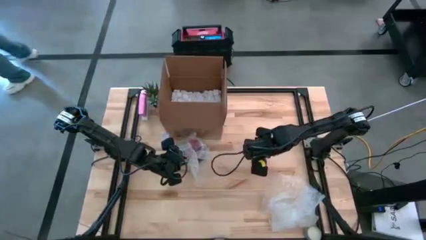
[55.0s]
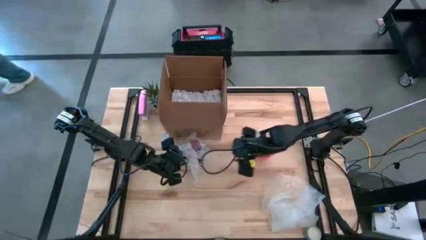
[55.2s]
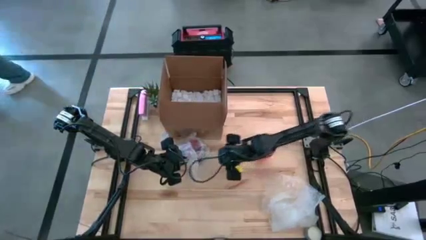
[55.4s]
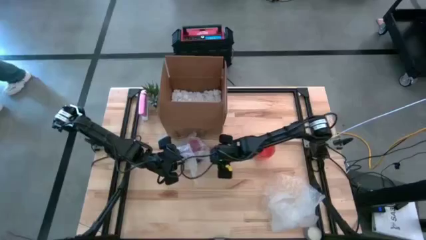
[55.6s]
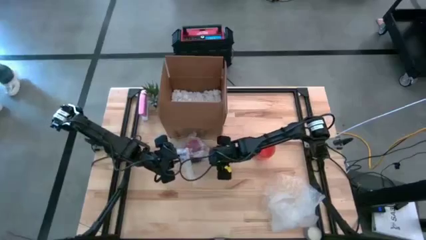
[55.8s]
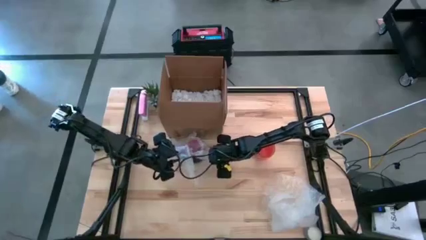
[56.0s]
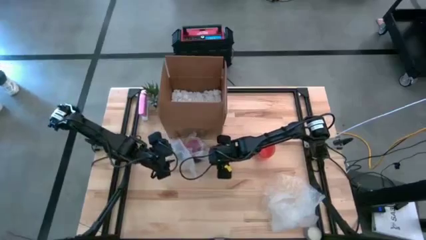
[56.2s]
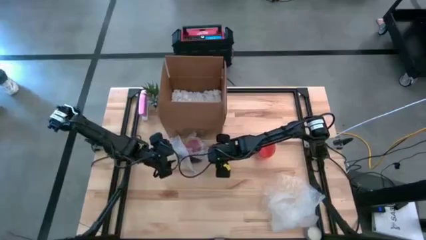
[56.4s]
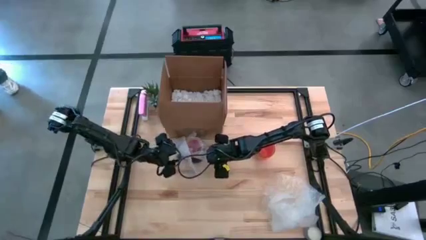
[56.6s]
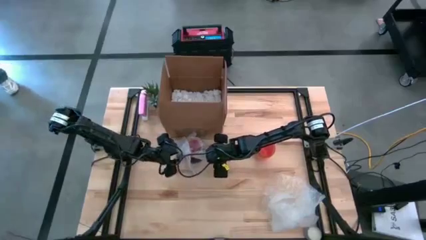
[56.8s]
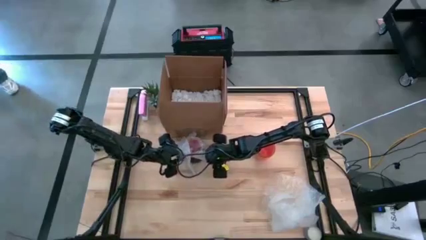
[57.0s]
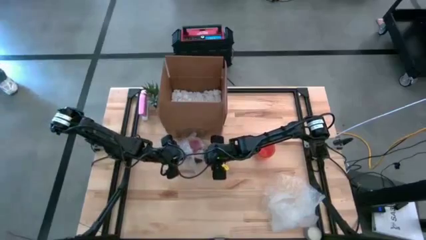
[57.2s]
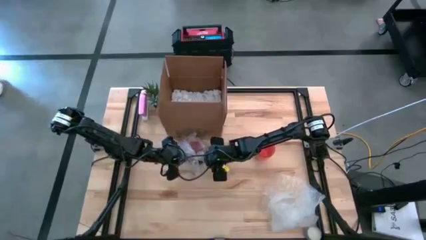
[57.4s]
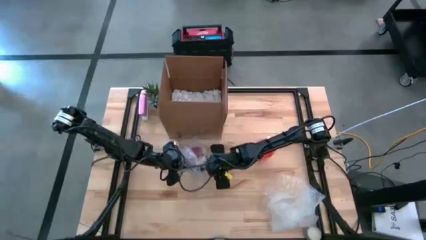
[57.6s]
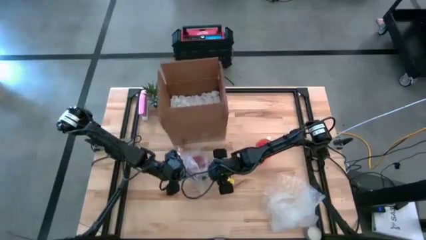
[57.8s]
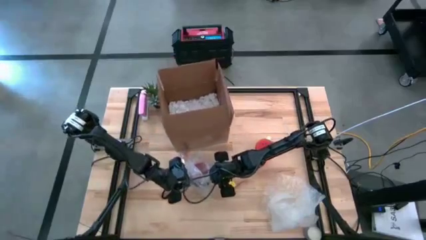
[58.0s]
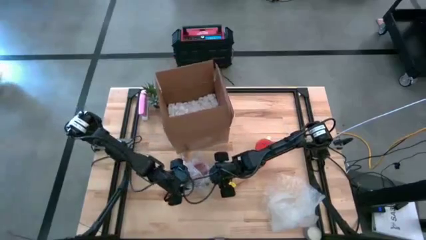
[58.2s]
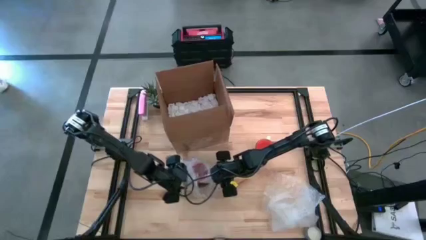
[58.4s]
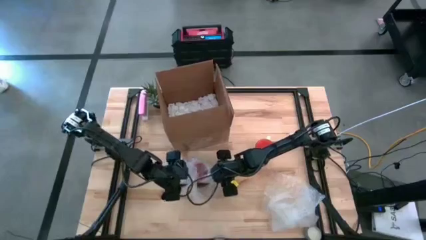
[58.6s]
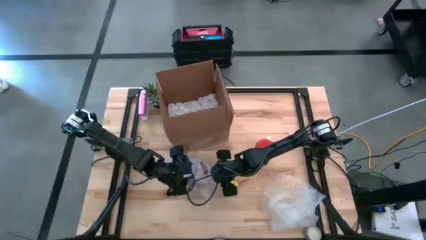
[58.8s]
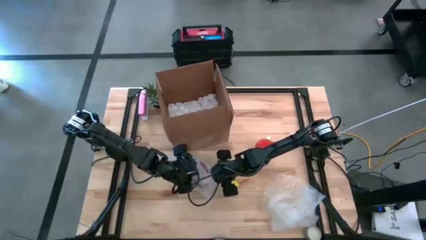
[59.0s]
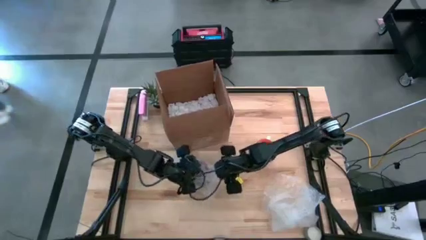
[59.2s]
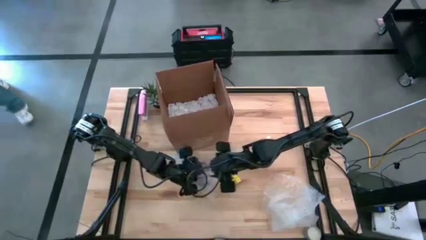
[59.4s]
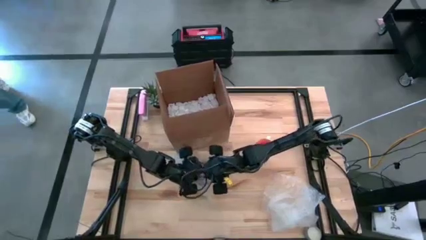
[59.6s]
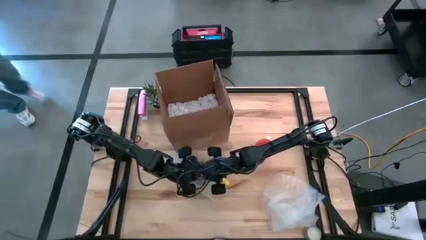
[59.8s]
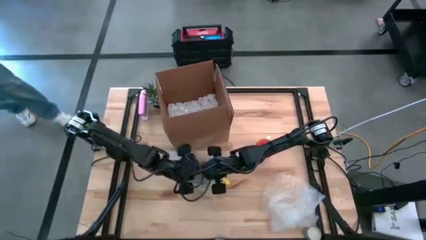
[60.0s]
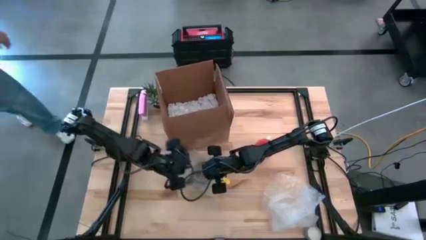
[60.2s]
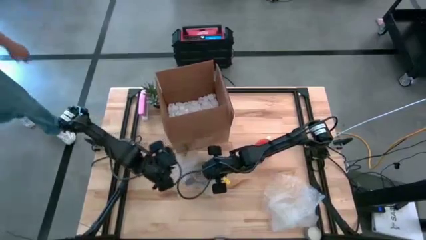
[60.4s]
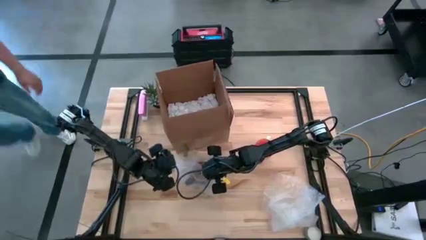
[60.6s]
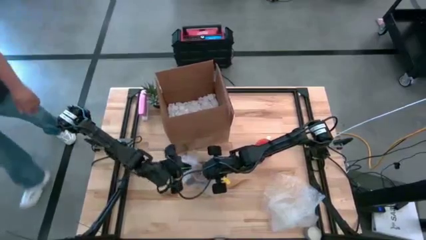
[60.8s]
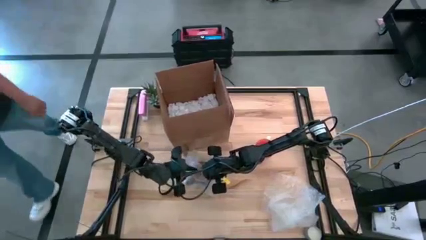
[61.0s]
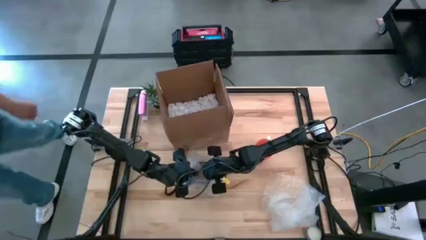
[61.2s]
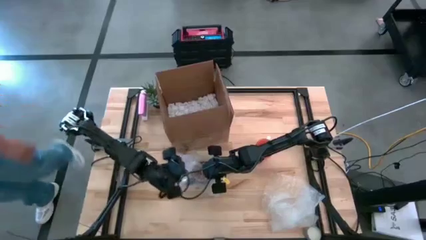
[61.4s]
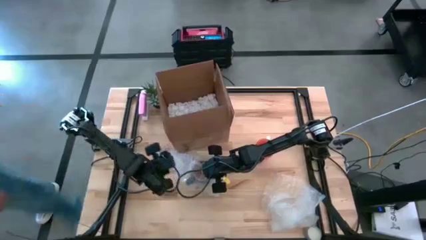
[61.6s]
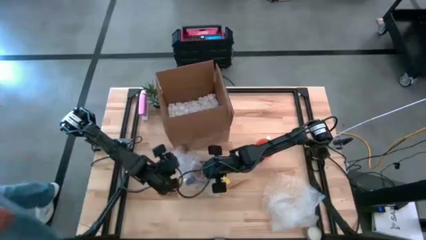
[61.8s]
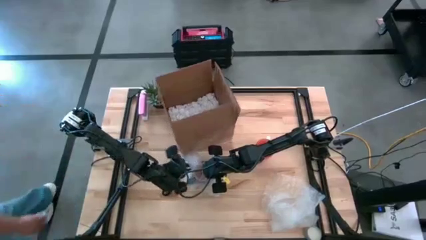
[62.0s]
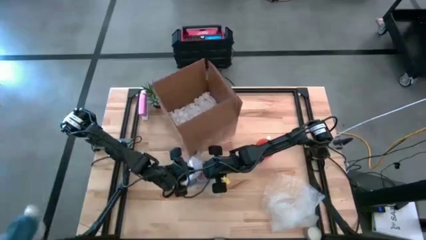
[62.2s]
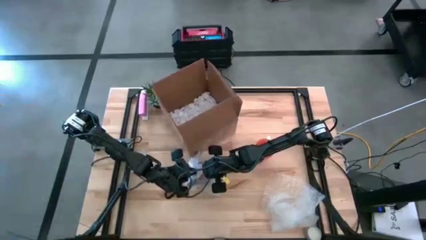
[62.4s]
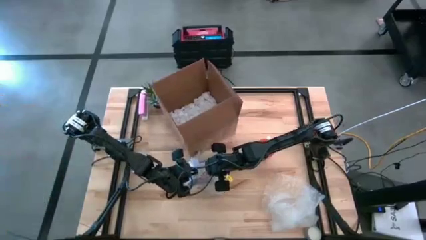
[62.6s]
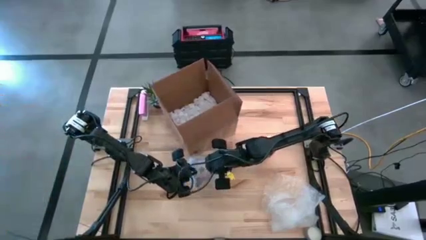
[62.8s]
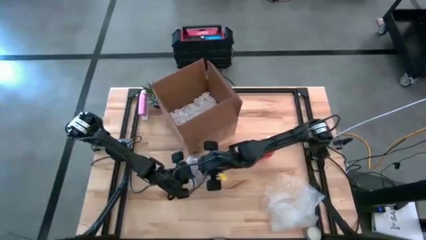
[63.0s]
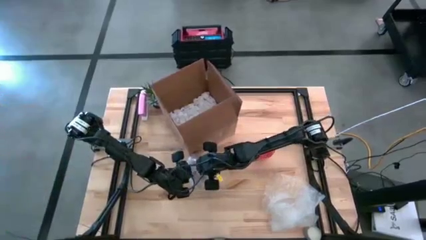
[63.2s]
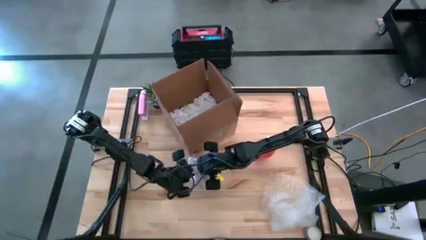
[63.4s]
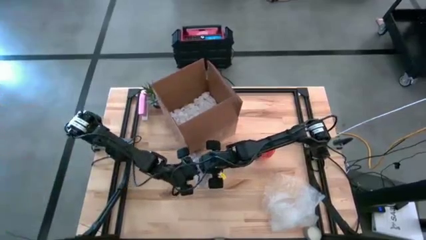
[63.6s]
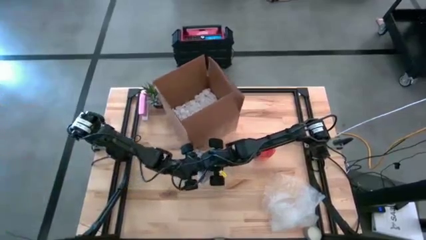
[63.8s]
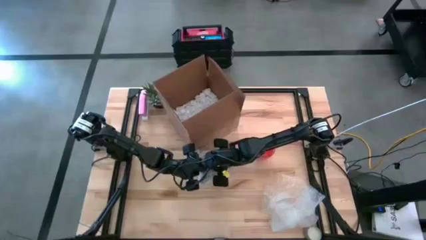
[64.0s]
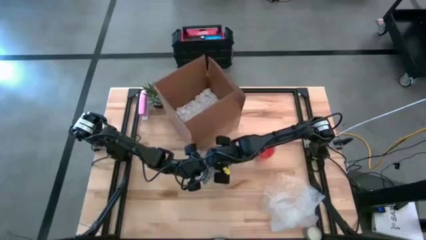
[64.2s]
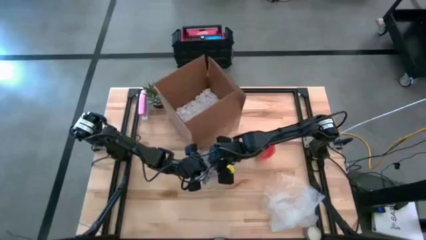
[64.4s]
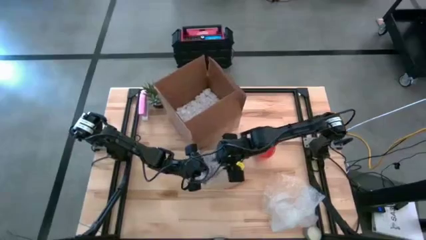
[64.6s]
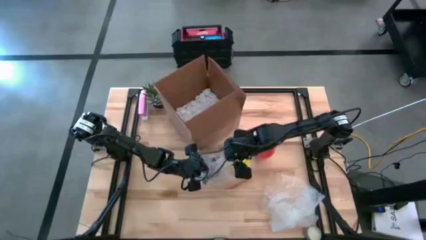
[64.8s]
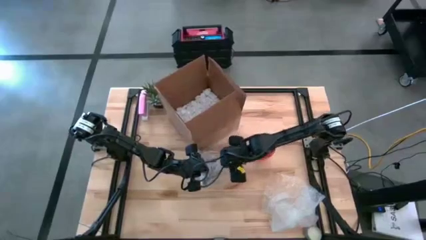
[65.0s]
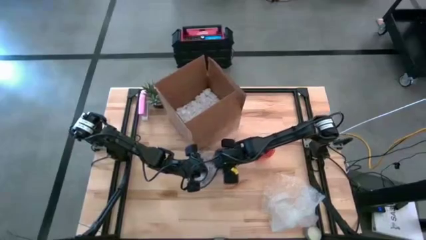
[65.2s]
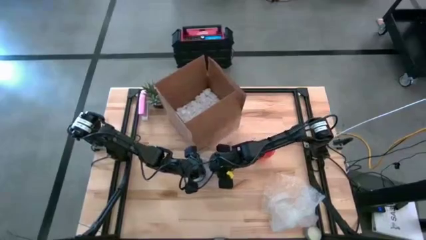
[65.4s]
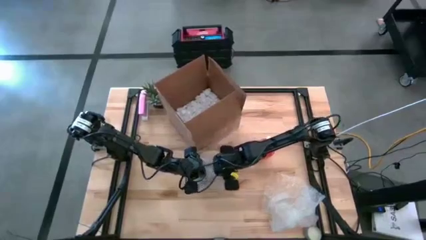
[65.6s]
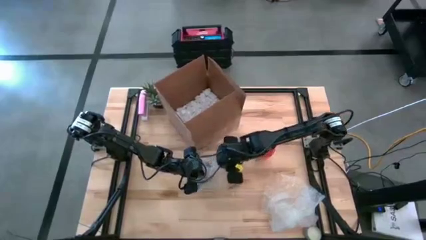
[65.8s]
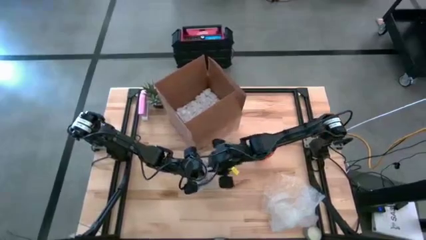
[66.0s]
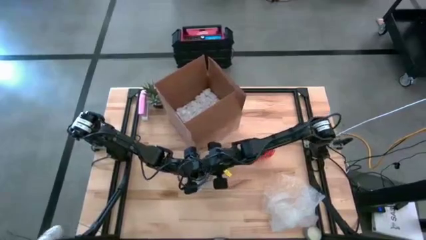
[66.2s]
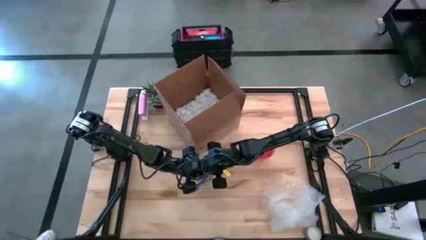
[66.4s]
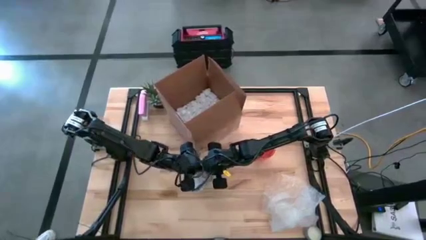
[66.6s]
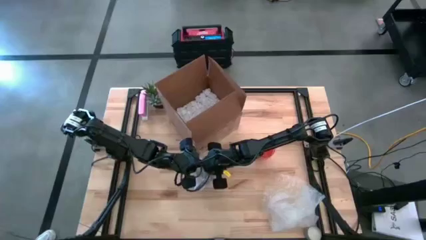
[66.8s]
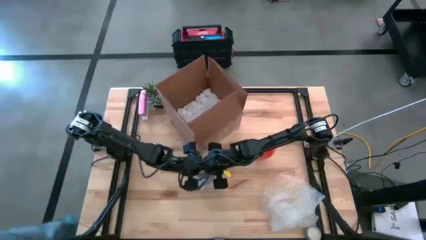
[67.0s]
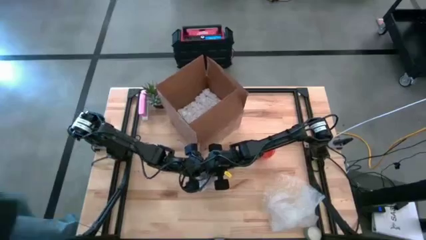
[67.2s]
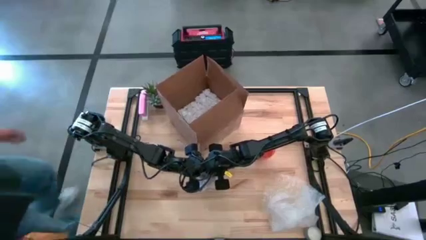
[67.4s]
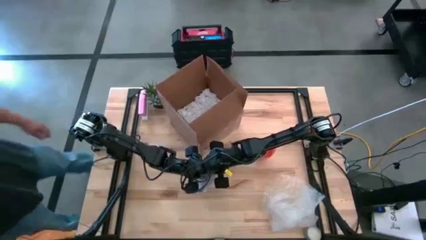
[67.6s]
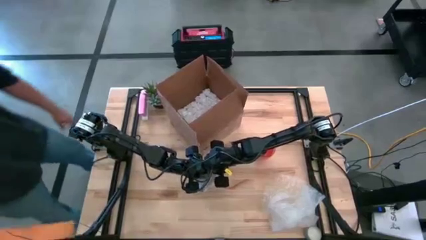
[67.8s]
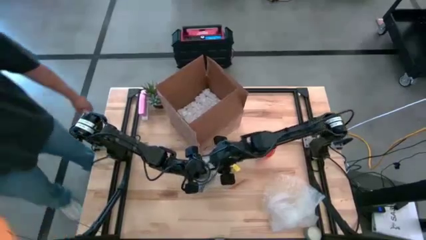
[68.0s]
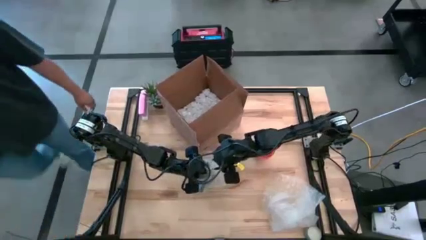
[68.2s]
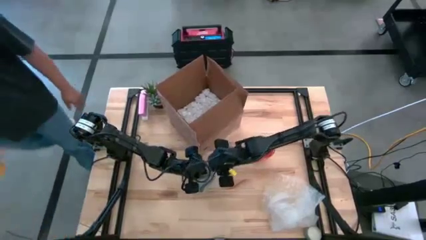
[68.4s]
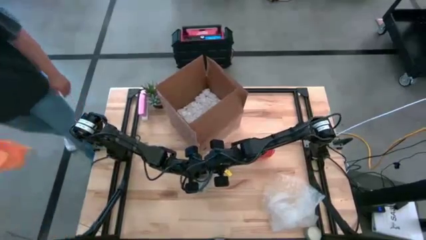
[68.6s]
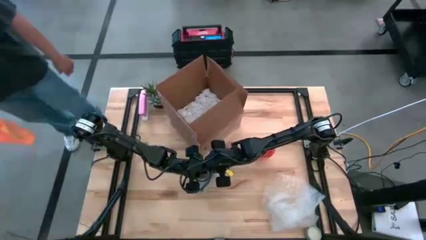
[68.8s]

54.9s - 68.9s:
Task: wrap mug
Wrap the black mug with transparent bubble wrap

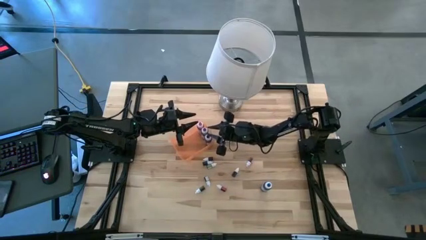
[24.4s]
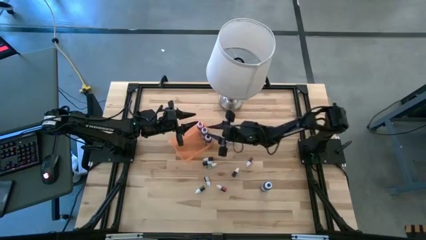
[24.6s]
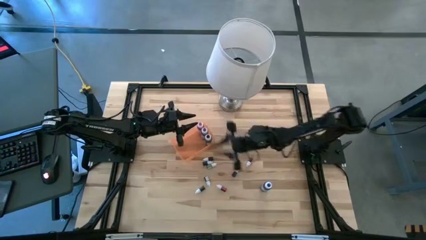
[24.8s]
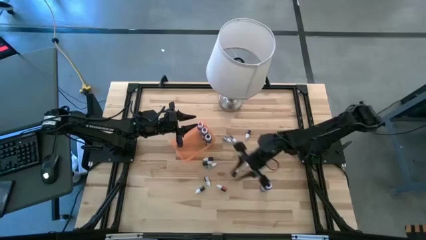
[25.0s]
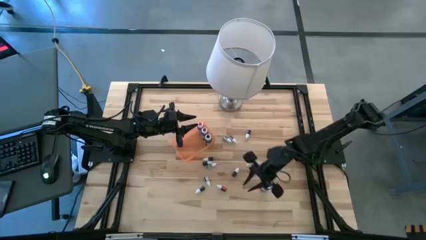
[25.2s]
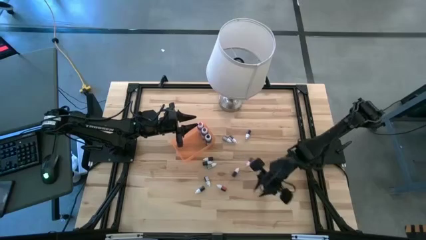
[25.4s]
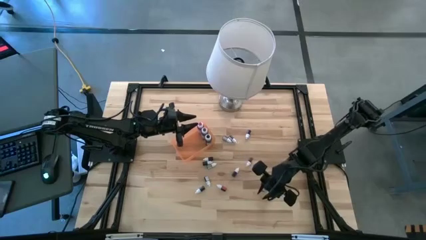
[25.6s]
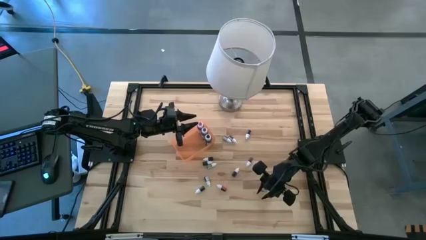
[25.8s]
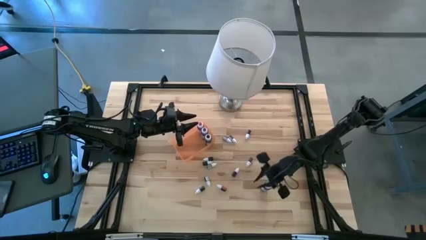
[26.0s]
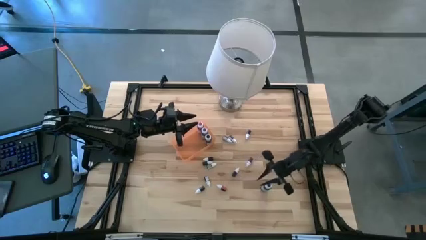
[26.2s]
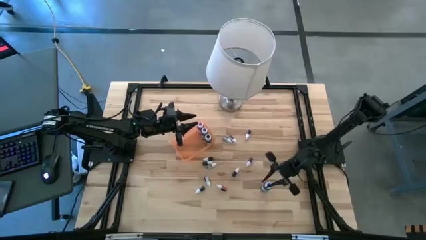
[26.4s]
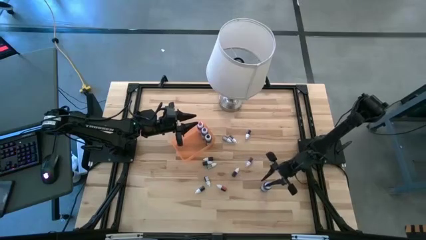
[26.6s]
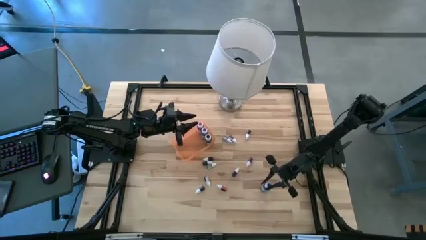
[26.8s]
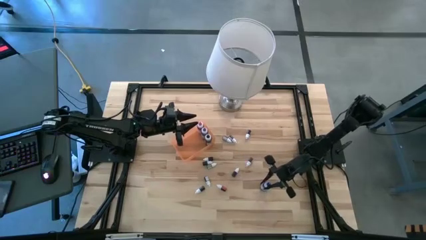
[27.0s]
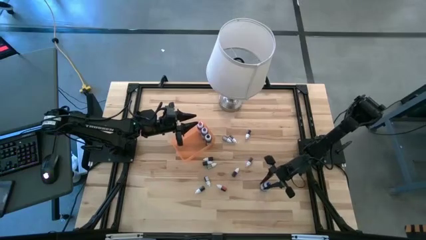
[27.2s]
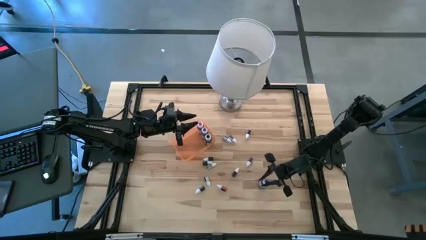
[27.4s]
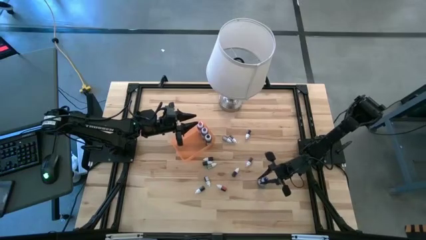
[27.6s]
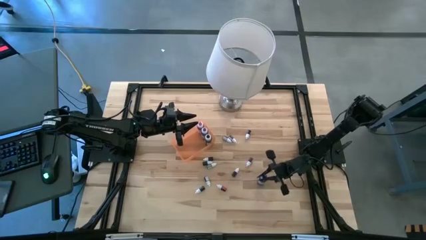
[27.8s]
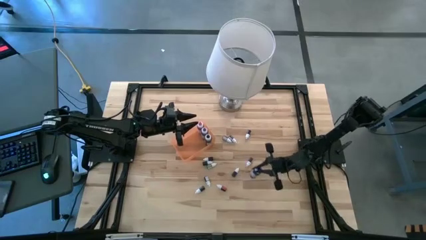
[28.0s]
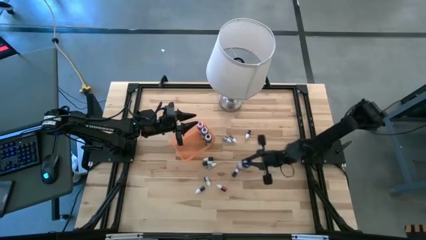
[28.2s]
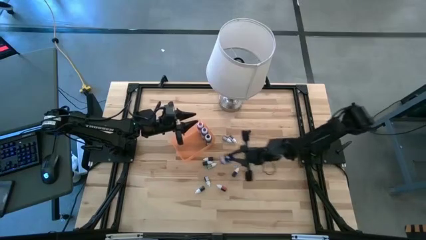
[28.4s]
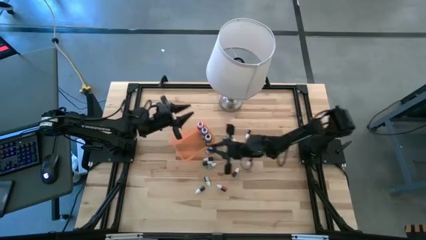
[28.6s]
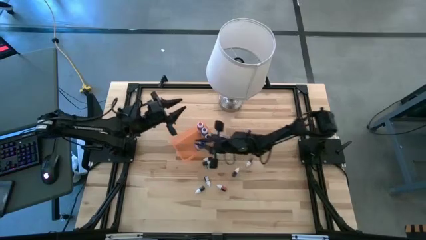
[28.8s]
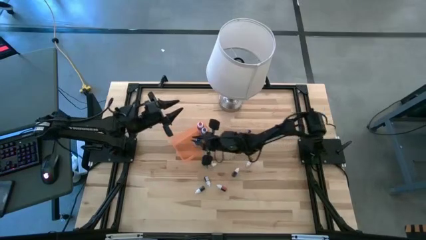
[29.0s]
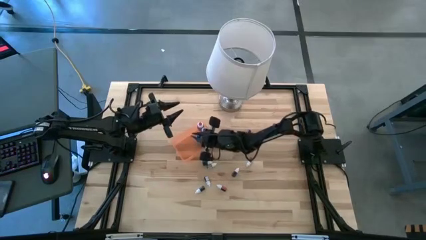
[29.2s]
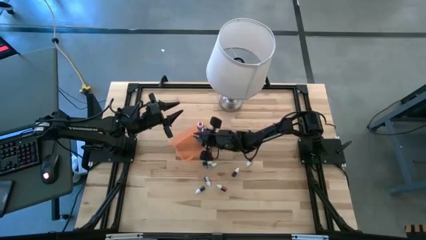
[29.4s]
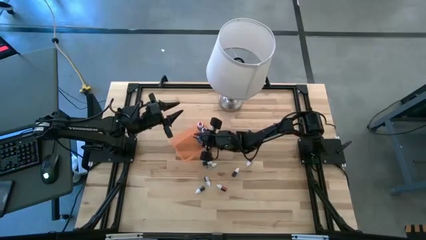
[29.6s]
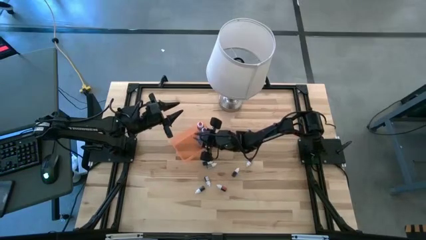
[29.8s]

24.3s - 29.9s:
Task: Pick & Place food coloring
Put the large blue food coloring bottle into the bin
